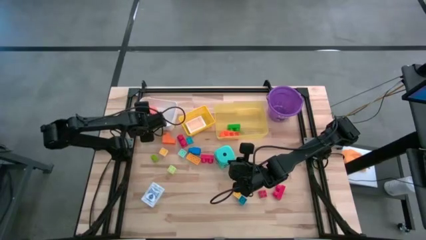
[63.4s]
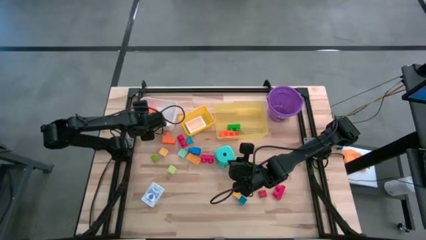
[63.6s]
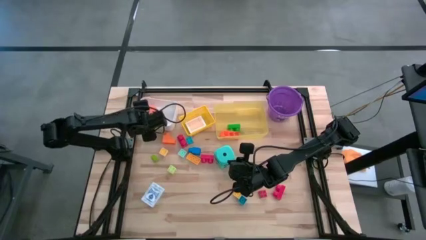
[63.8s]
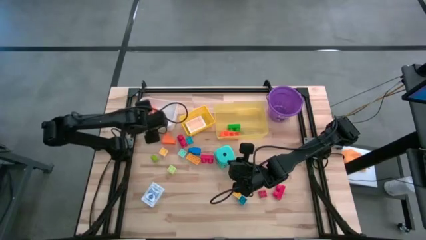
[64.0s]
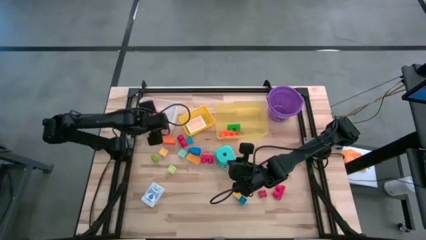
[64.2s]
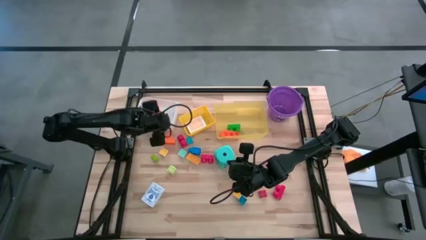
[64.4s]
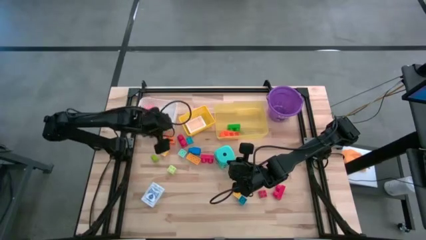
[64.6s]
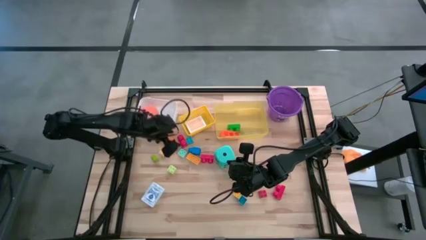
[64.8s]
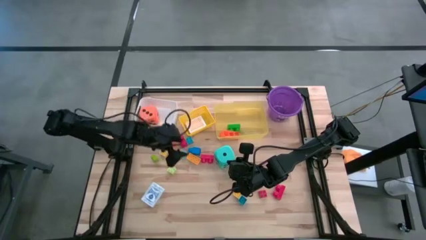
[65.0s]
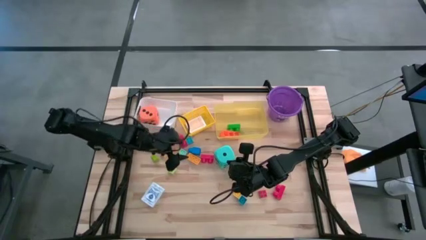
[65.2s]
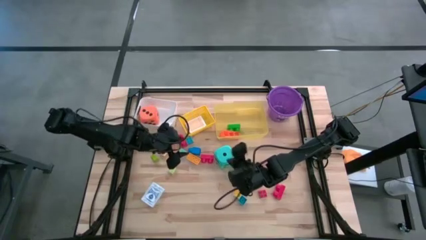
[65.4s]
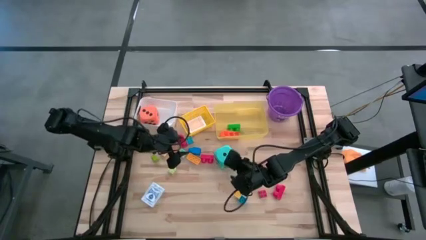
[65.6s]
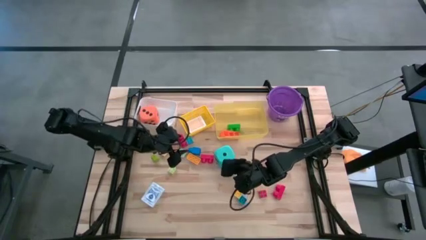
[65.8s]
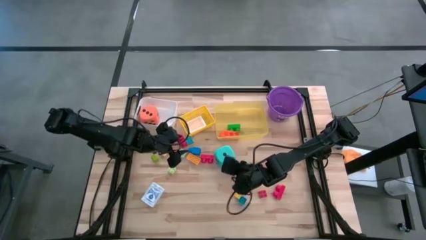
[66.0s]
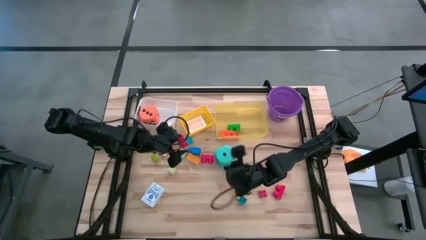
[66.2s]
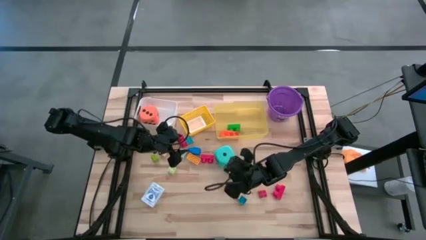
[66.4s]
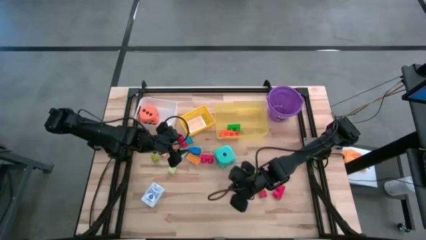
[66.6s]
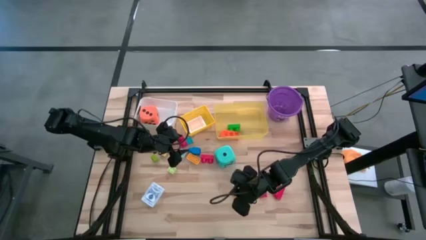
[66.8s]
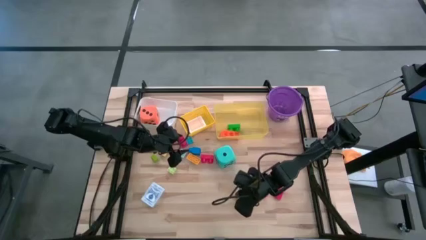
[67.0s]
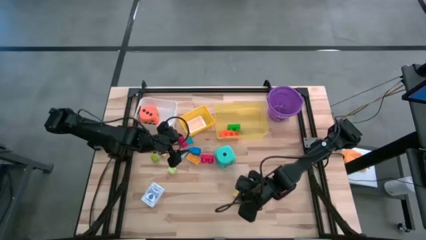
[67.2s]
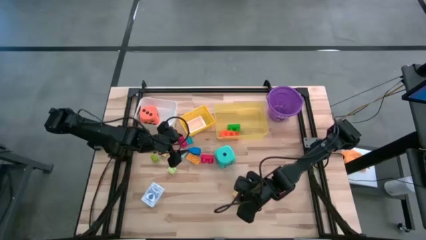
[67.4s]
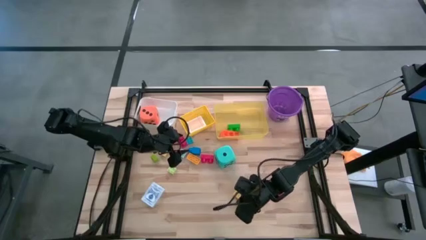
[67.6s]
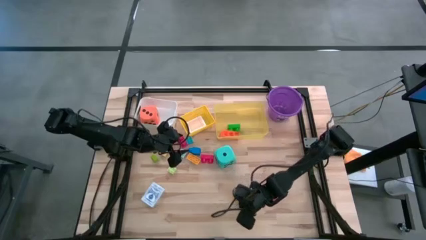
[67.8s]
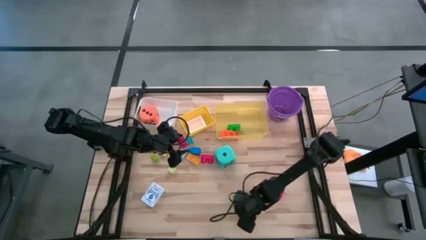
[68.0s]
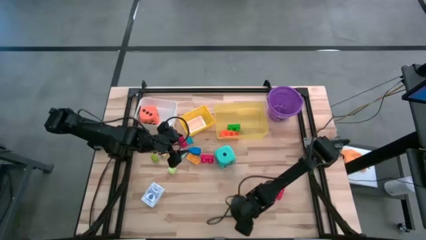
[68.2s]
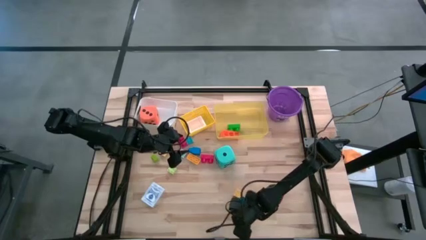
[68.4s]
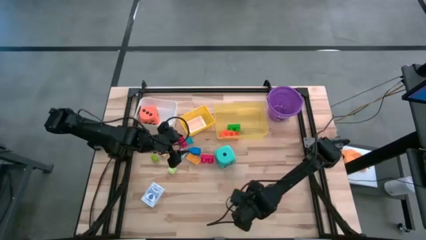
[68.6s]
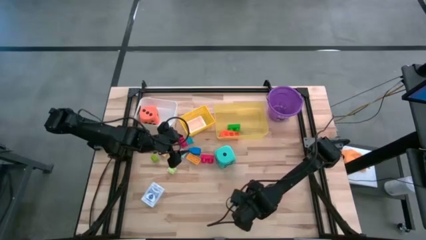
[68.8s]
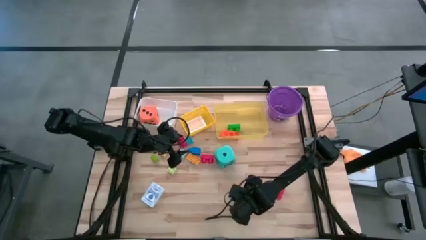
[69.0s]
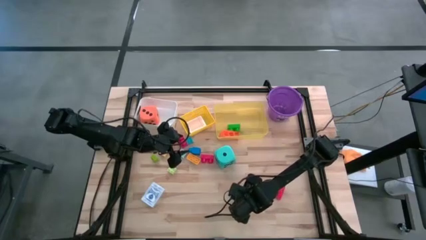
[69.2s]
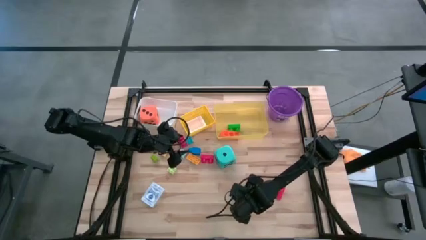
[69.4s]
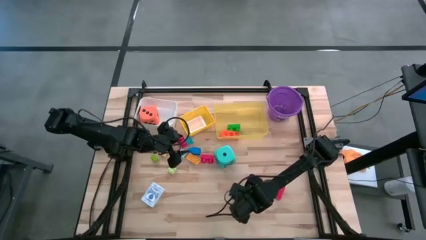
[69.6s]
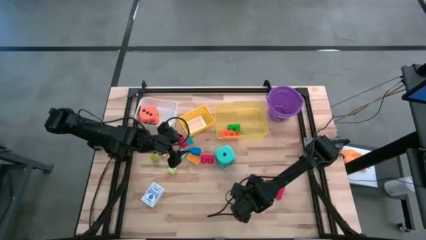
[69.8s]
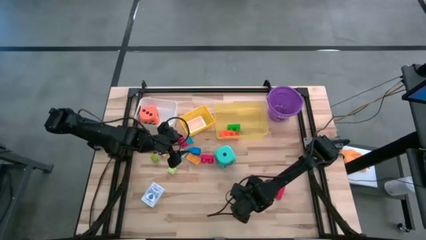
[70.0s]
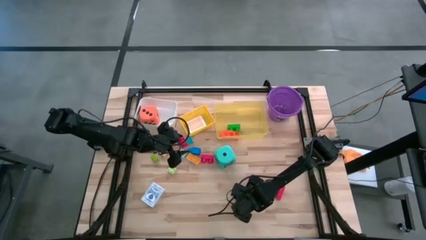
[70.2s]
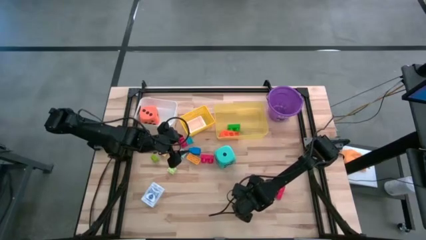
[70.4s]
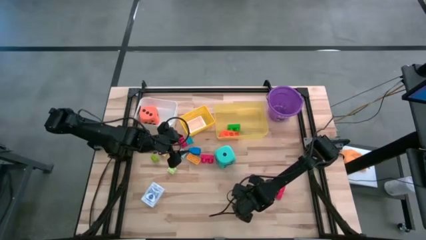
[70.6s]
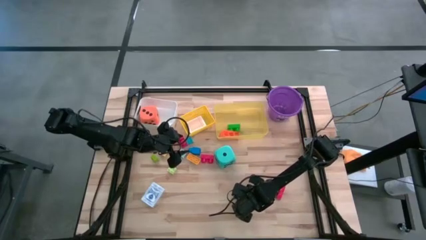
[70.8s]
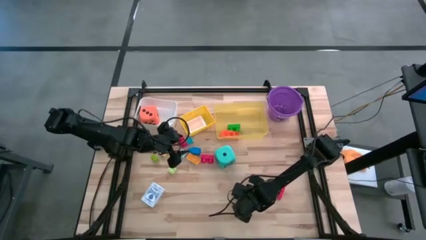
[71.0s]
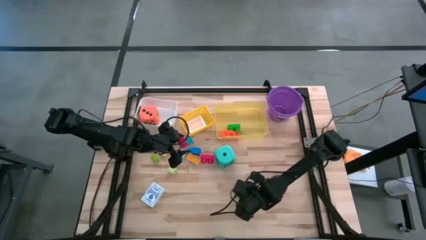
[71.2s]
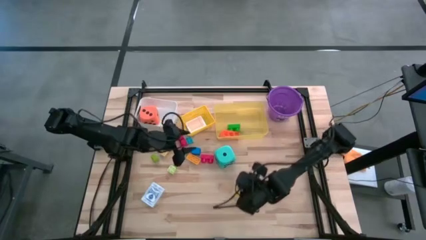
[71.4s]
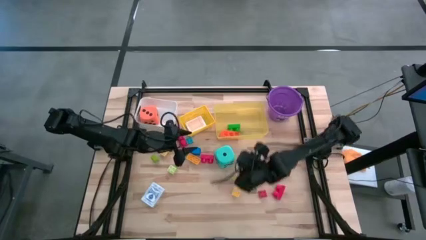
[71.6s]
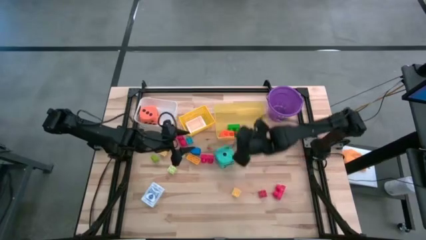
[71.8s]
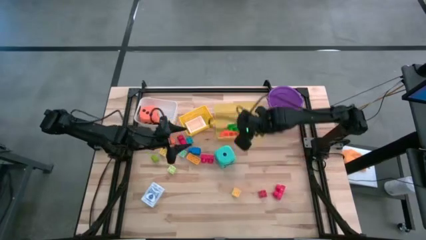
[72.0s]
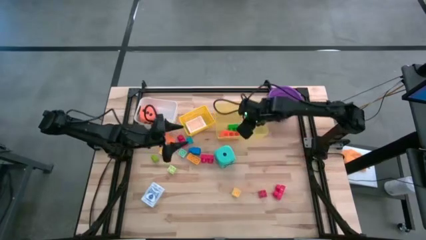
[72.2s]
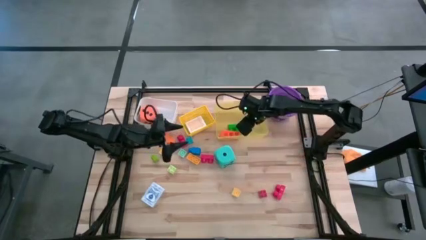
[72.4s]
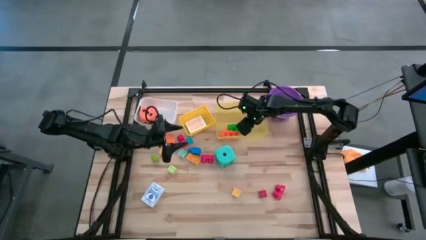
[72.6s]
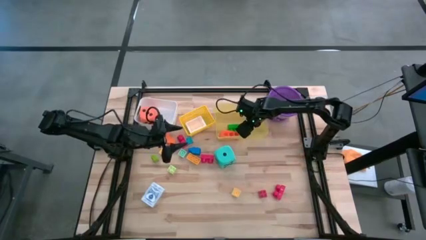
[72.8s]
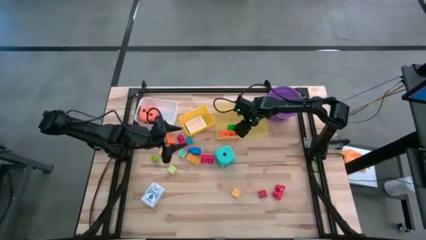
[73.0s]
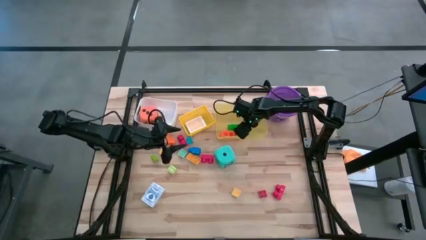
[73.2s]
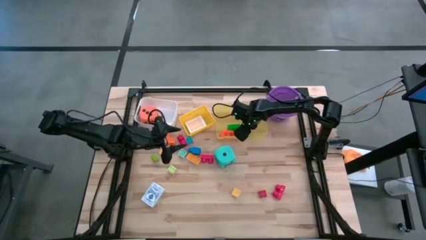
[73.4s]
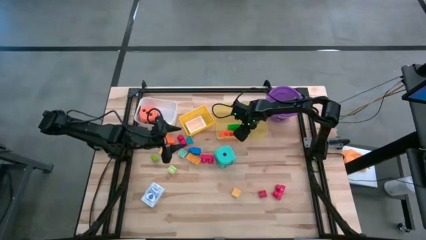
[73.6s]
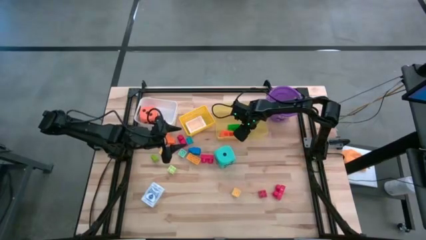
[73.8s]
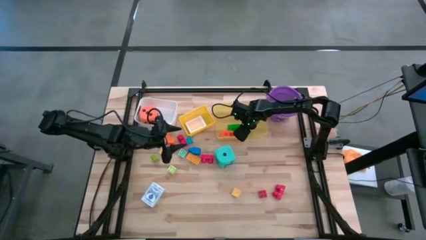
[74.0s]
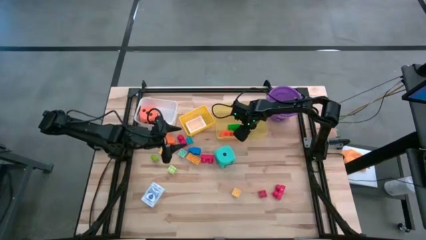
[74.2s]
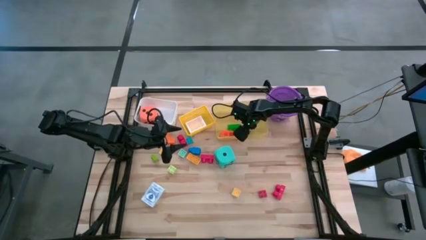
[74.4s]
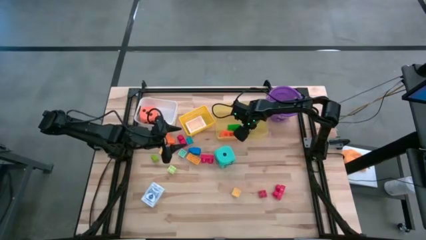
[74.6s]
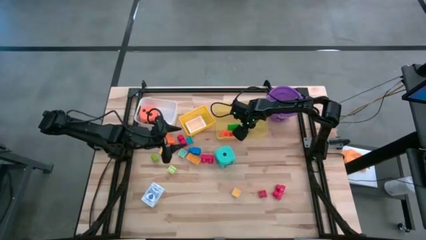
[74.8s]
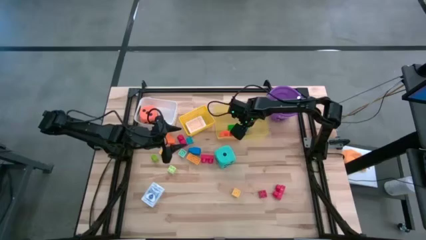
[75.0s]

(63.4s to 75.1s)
Task: Pick & Place Toys
Put the blue game piece into the yellow bin

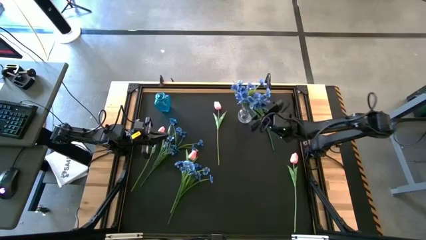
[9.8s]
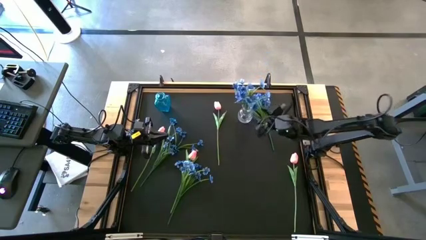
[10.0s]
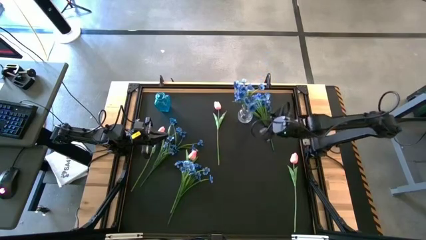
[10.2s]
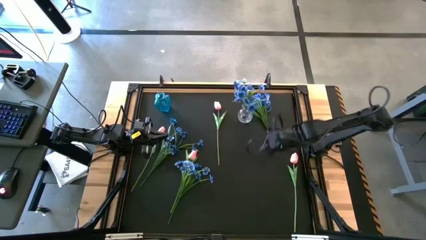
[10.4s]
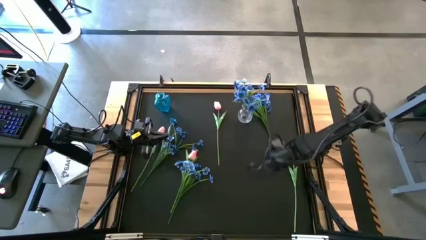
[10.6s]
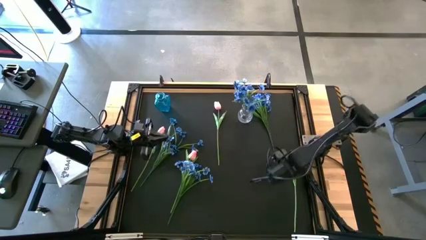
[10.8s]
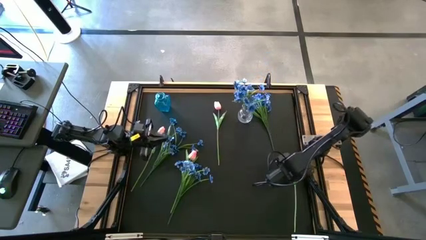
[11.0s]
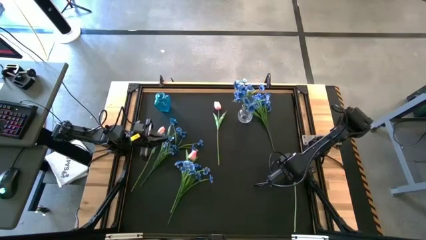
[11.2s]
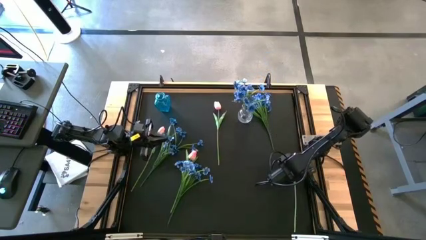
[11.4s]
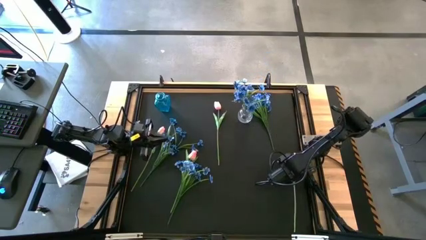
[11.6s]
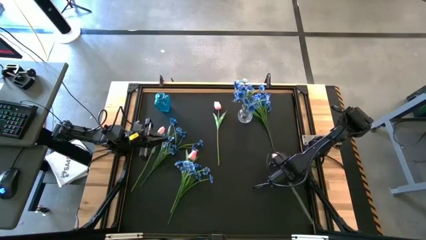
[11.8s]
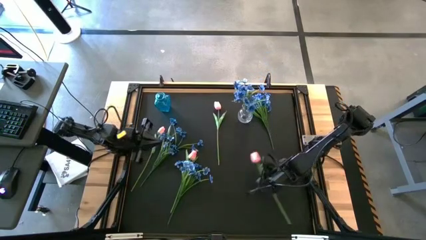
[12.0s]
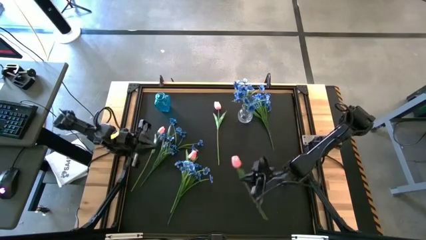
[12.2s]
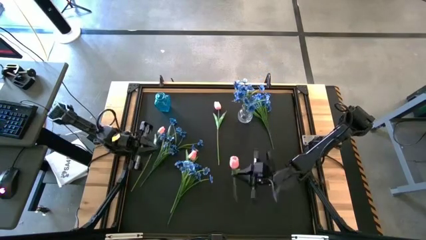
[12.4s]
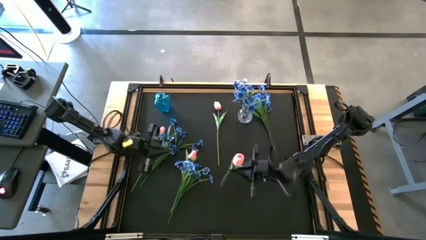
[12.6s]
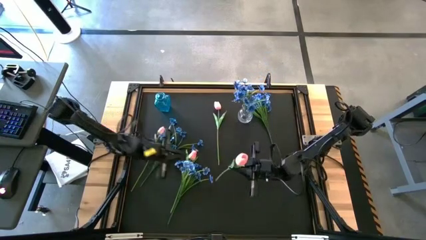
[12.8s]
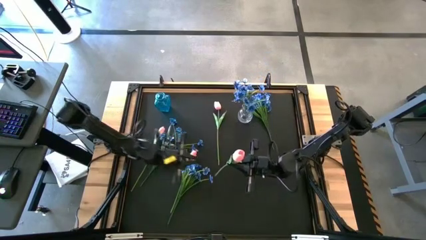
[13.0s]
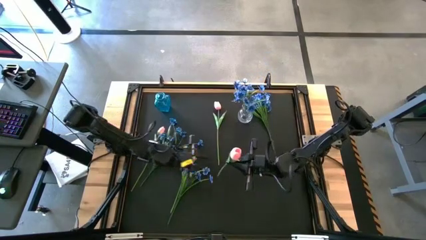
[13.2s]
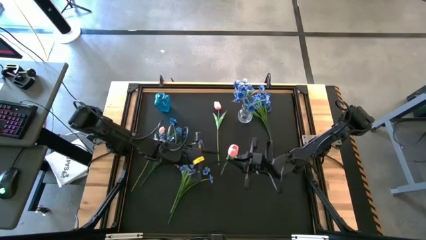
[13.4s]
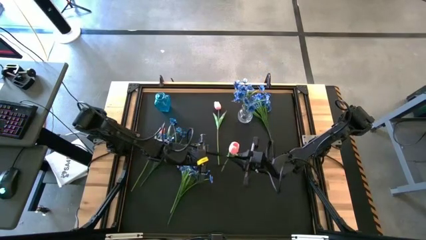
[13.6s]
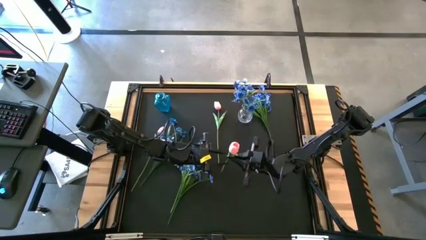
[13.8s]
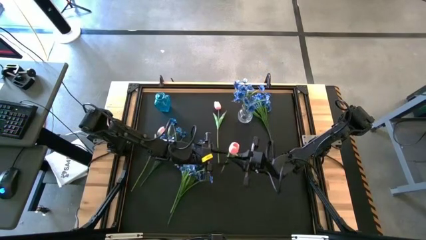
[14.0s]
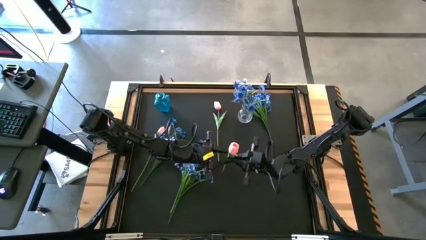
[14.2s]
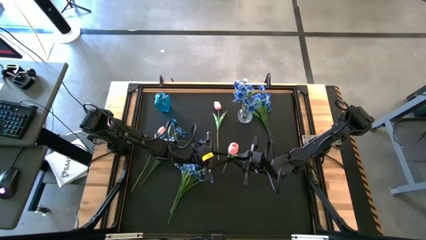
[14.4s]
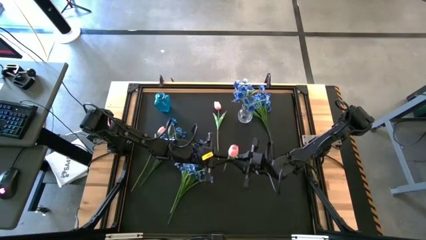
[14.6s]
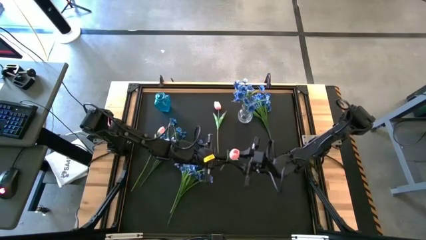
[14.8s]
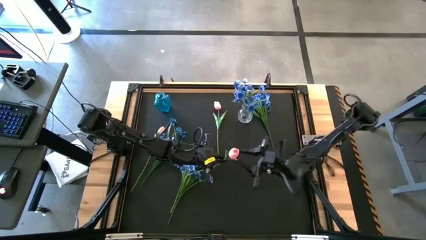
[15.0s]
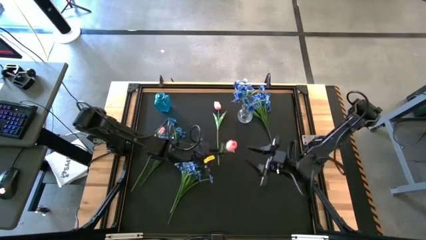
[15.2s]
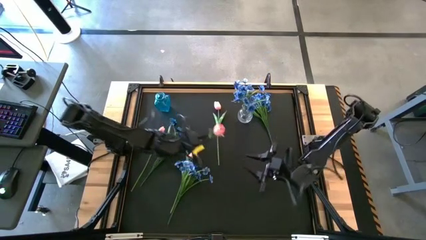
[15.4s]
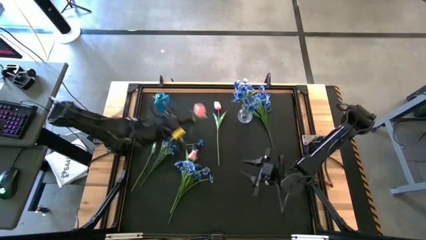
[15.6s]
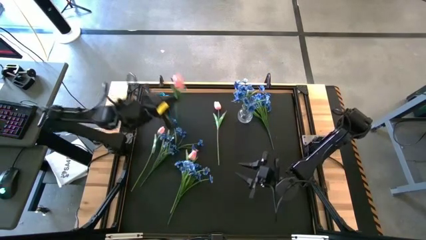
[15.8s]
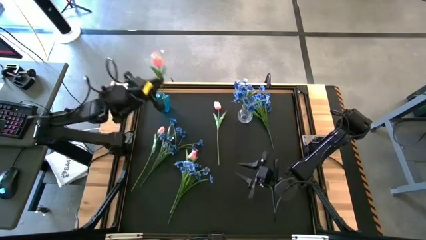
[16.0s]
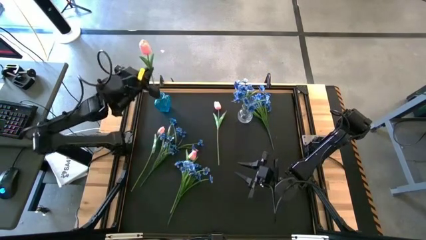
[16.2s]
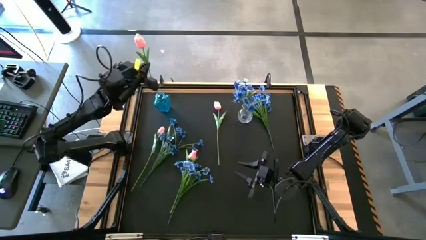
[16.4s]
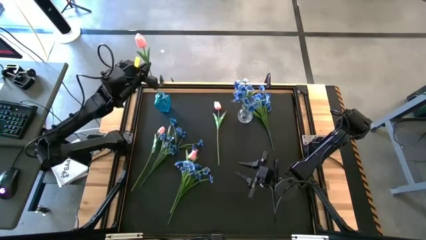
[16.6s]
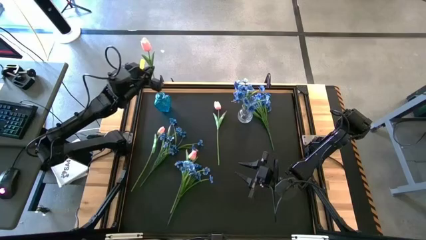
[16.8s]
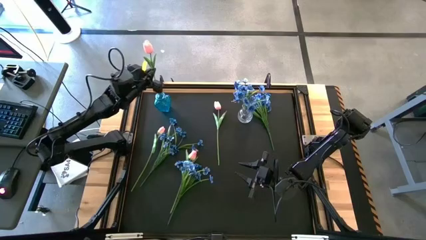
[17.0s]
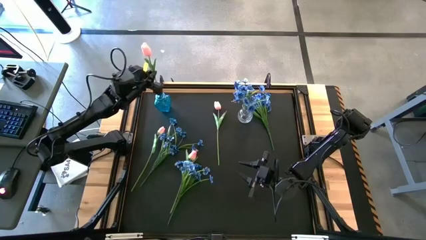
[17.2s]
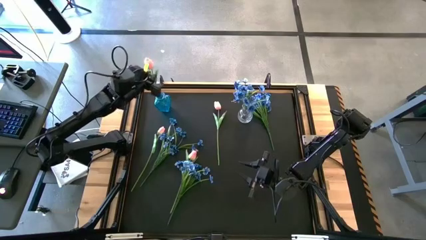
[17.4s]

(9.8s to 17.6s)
Task: Sort flowers into vase by color
Put the pink flower into the blue vase
